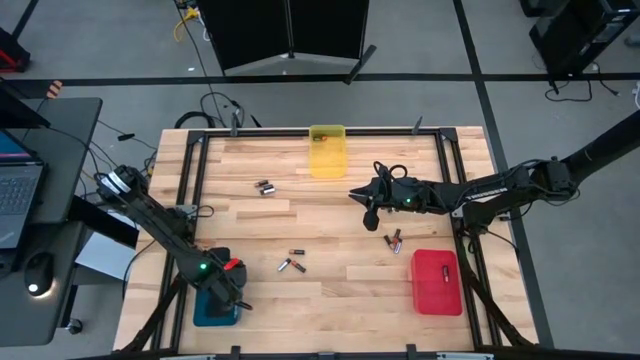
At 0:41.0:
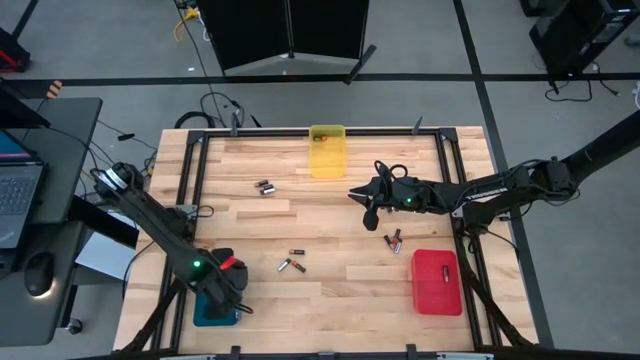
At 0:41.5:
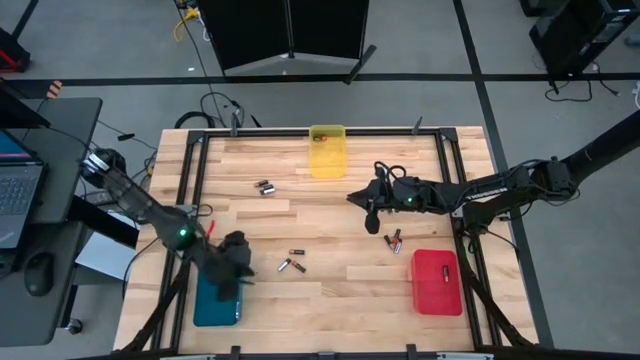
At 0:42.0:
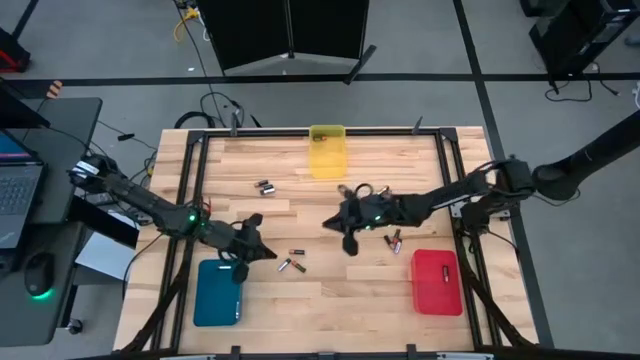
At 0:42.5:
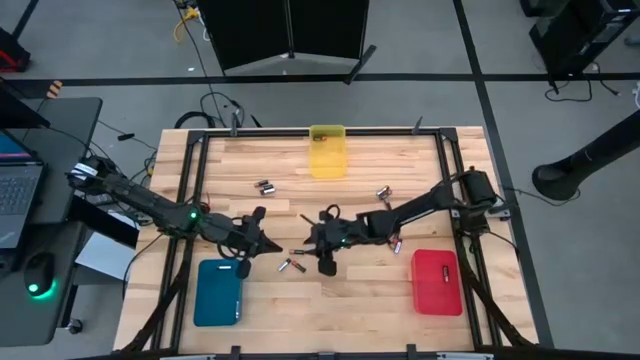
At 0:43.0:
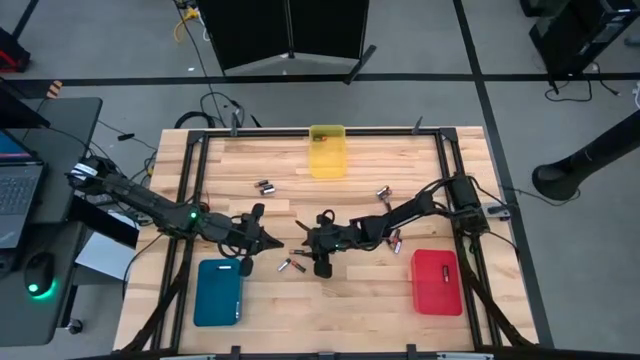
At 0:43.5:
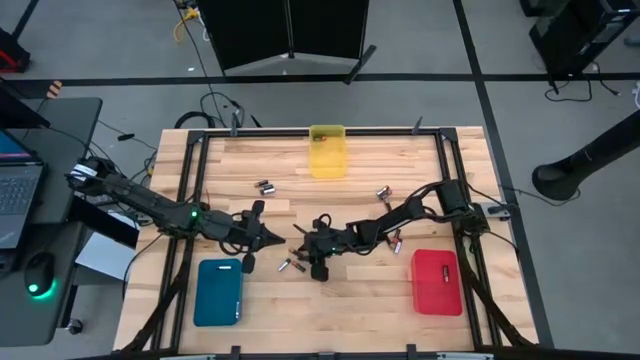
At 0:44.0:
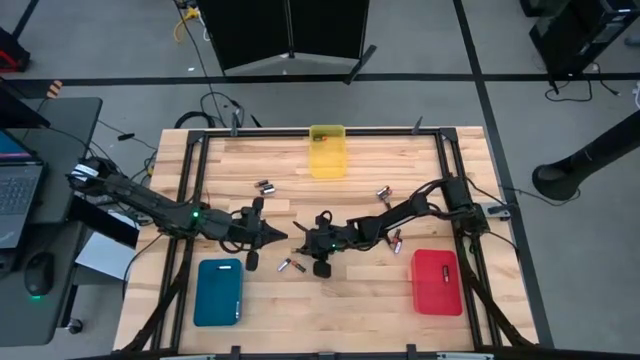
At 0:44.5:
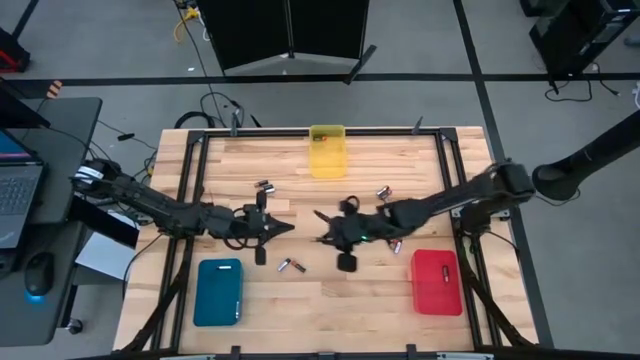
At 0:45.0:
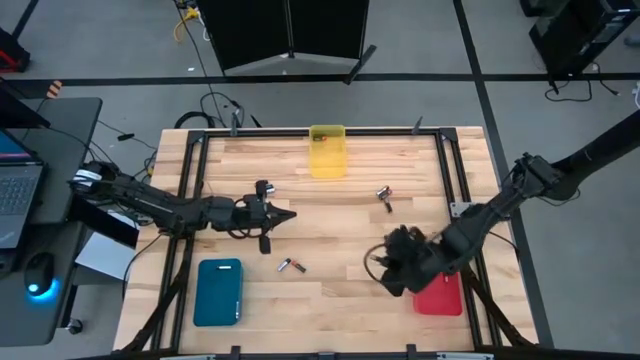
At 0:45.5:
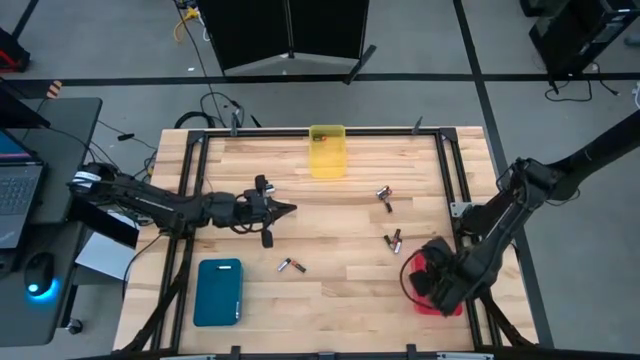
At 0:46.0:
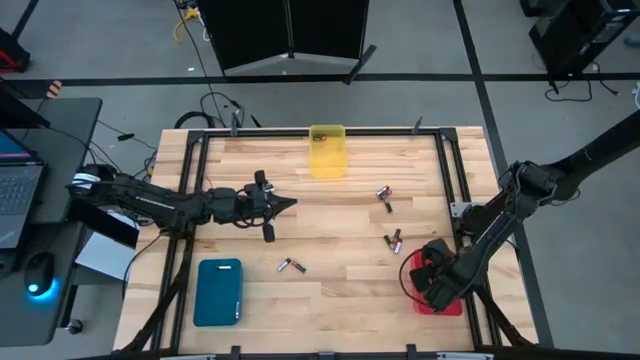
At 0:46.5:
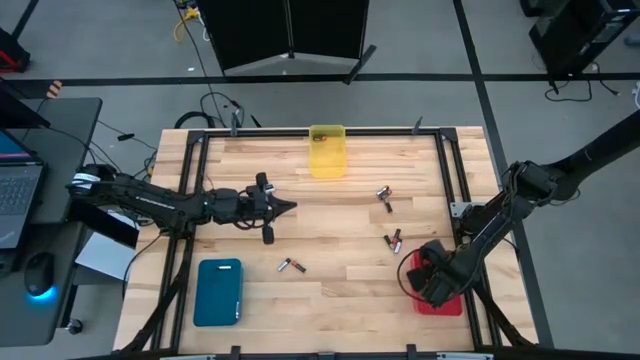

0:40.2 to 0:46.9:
Task: Sort batteries
Put the golden battery into the red bin

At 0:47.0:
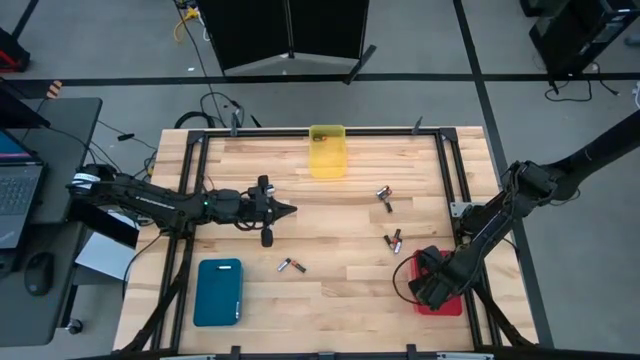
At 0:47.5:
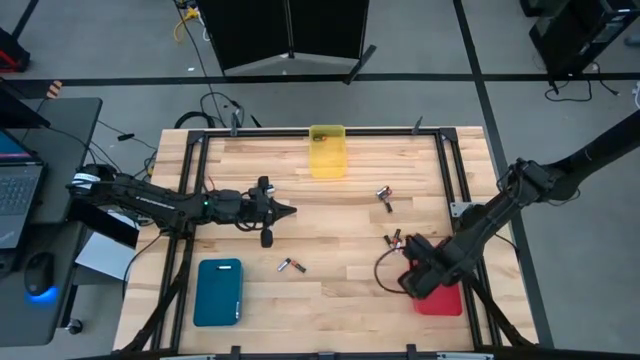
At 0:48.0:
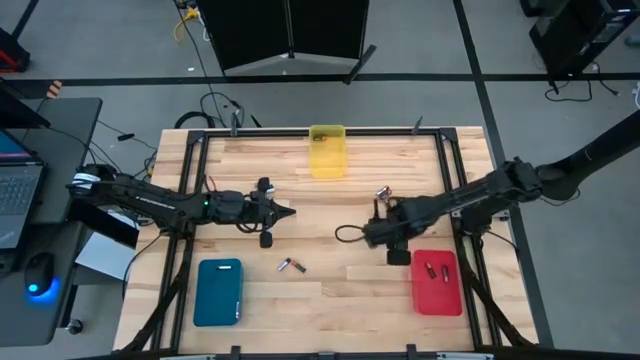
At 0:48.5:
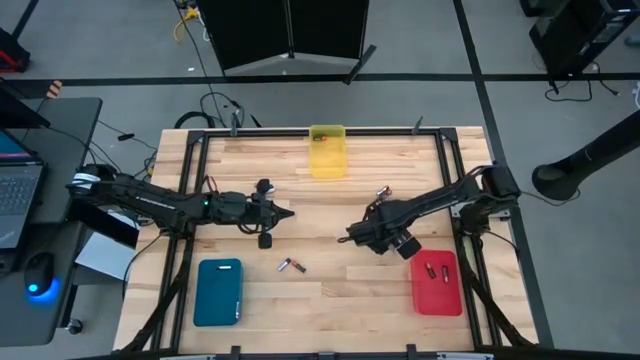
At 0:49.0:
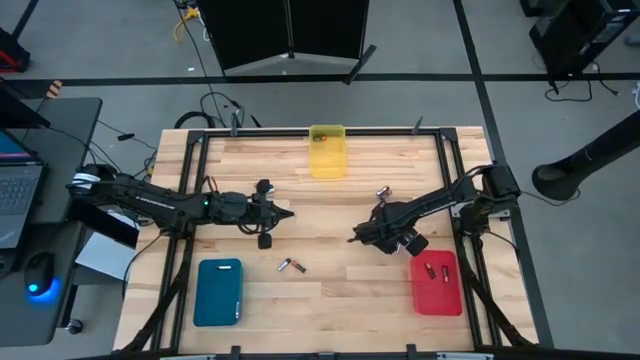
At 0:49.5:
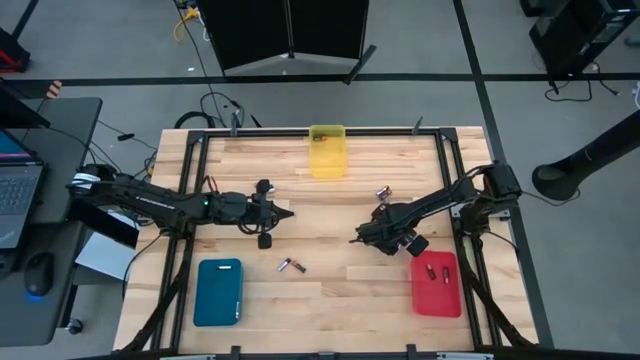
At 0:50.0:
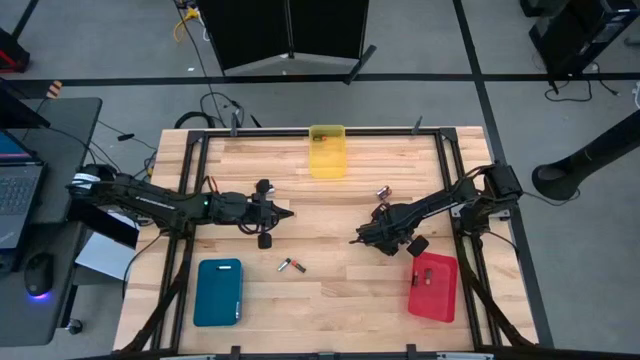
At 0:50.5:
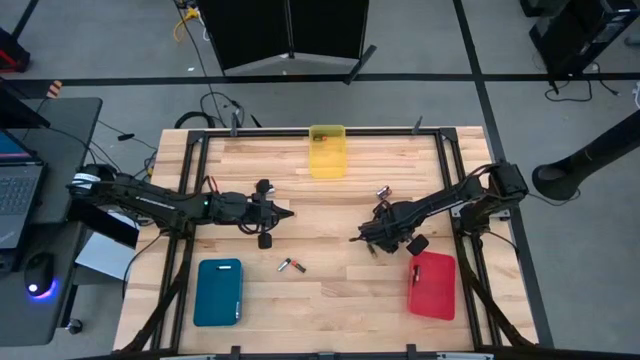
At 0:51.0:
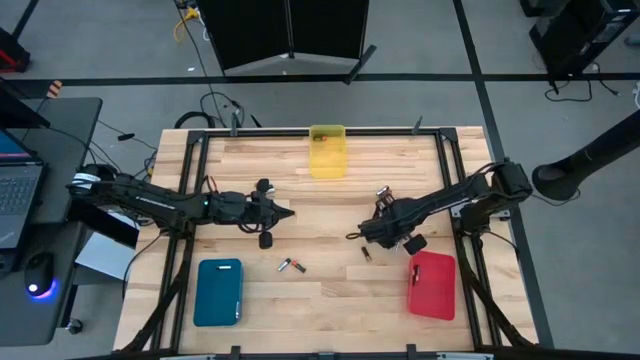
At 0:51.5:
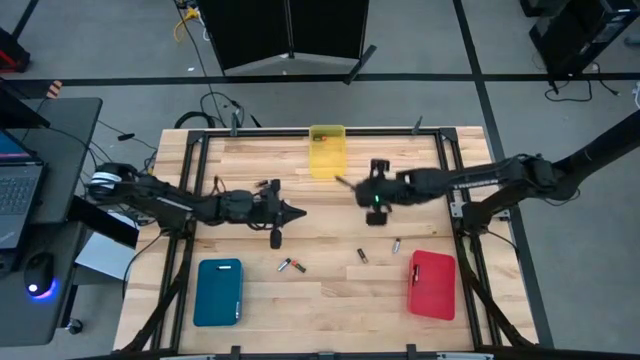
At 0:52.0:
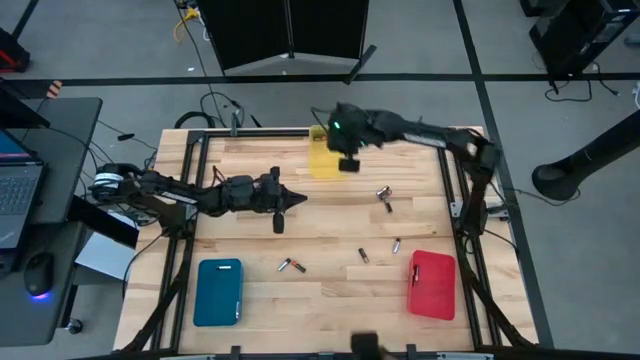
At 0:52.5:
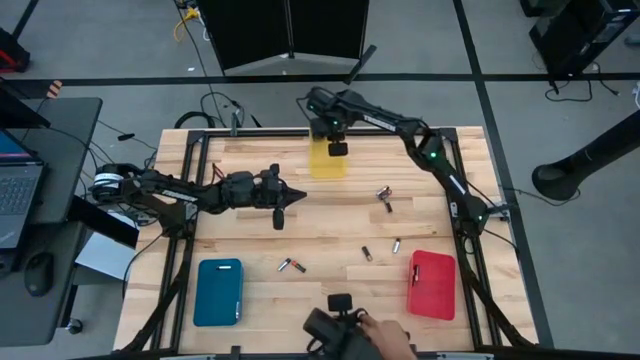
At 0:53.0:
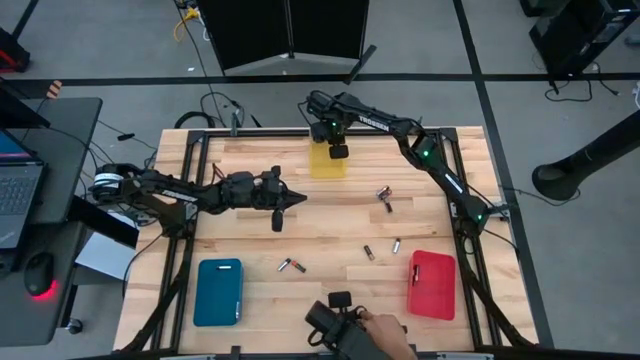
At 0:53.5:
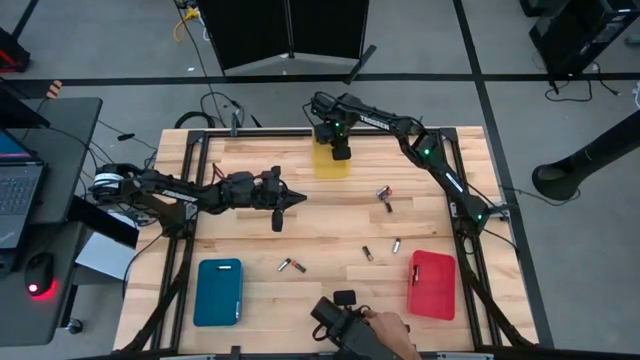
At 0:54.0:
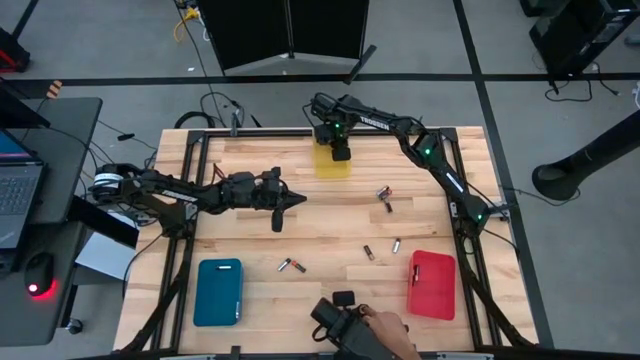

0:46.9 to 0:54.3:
Put the bottom right orange battery into the yellow bin

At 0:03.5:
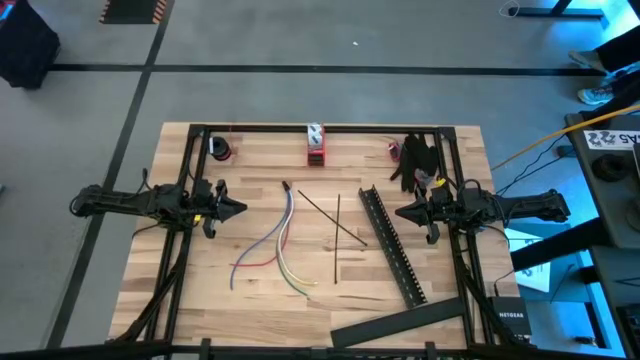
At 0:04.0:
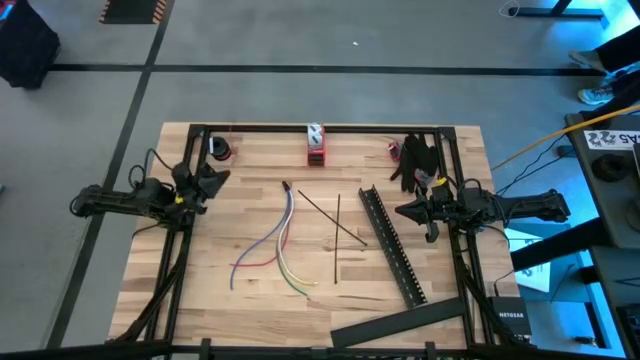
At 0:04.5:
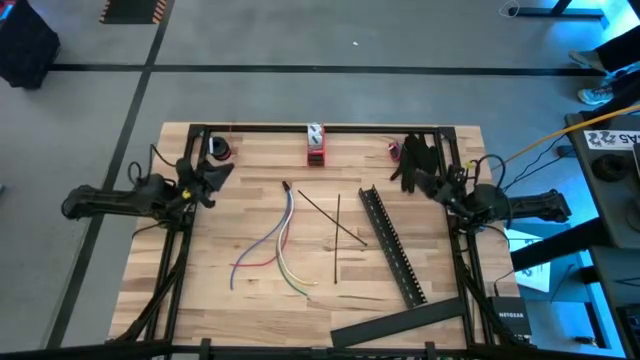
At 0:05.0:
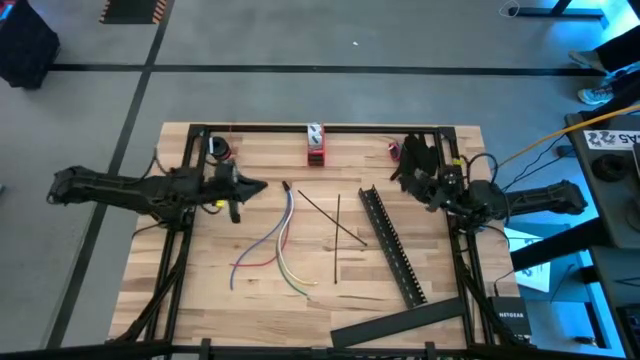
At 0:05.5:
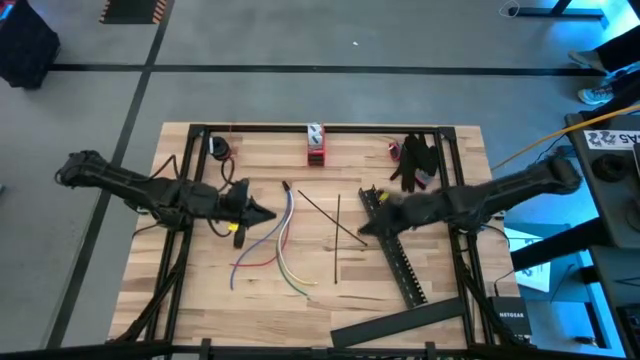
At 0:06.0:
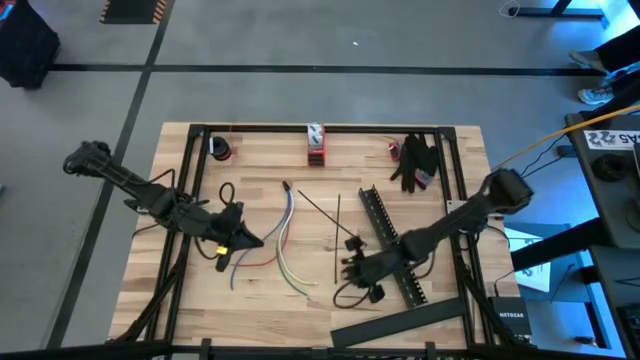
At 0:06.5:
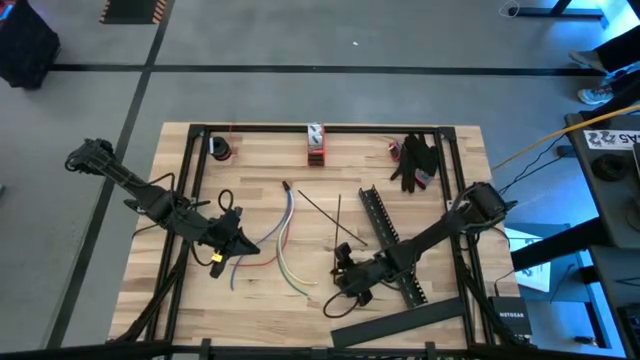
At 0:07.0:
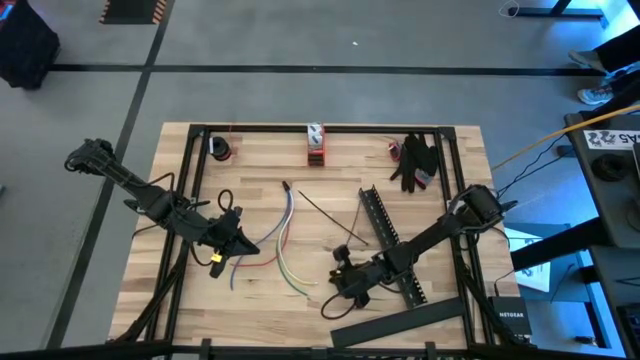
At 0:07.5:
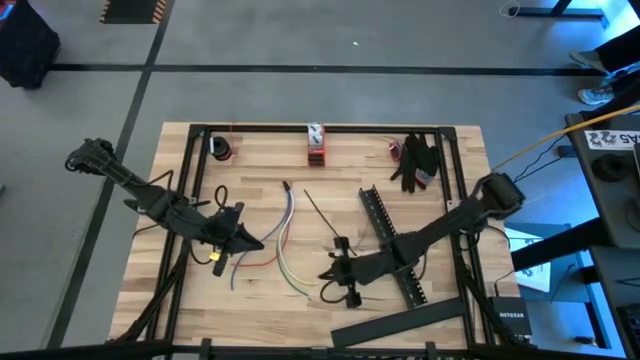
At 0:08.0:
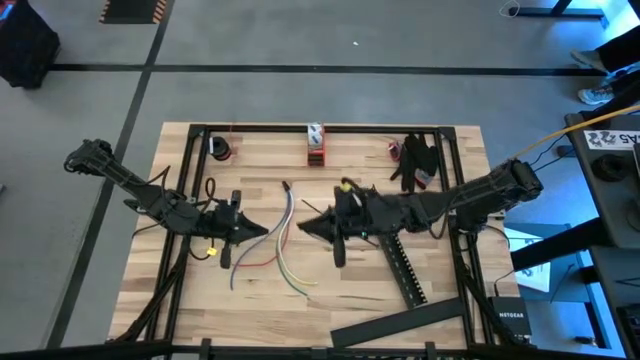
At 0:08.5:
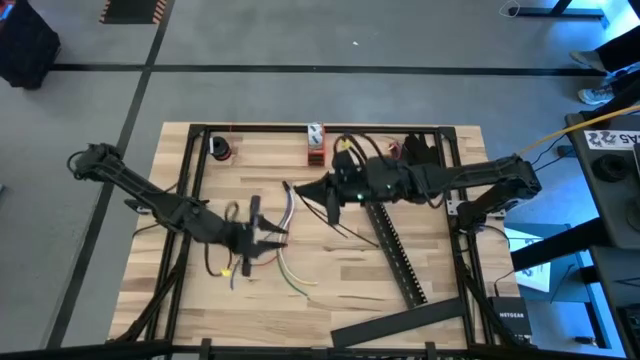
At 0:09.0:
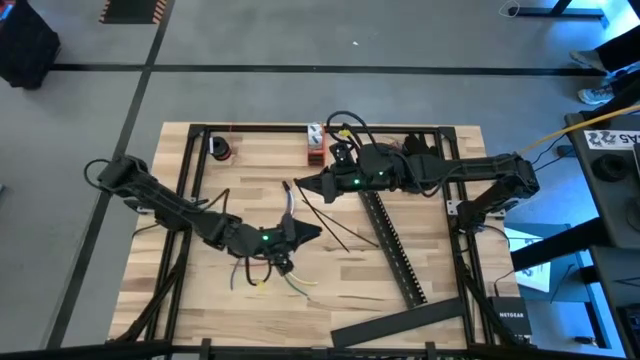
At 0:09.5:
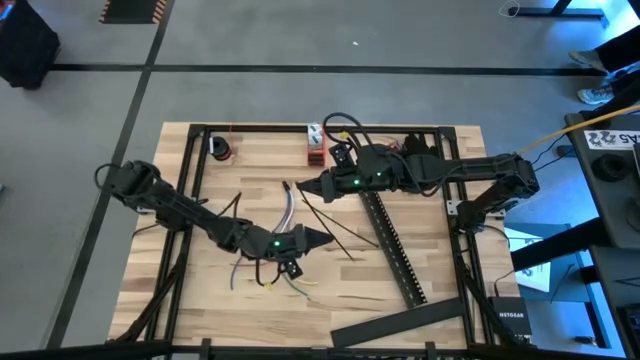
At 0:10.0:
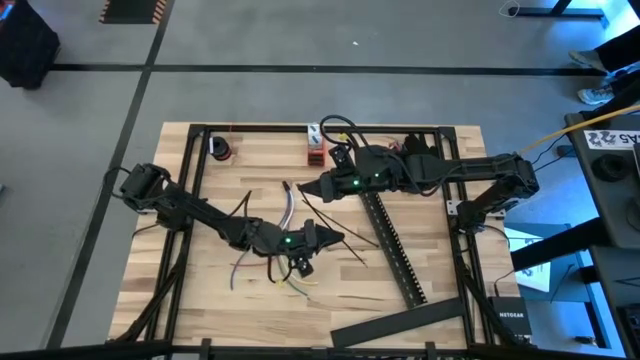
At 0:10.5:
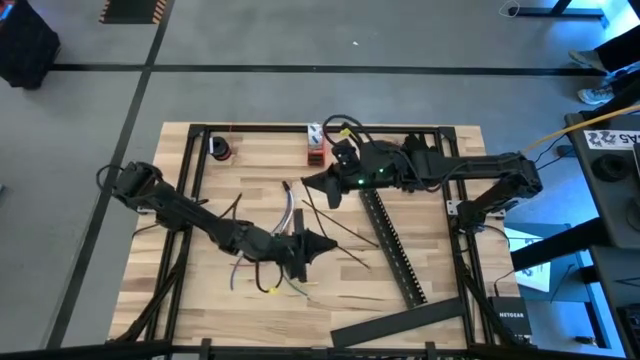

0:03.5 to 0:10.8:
Task: Ziptie cables
Wrap the black zip tie on the cable

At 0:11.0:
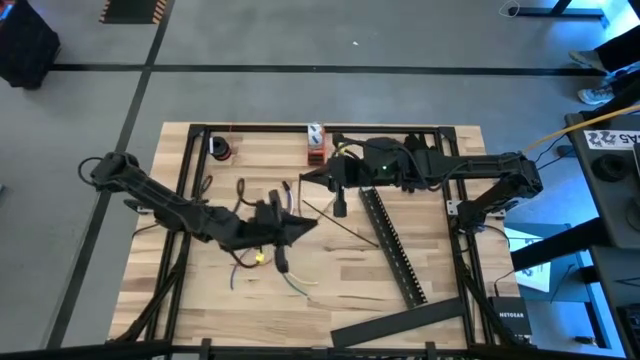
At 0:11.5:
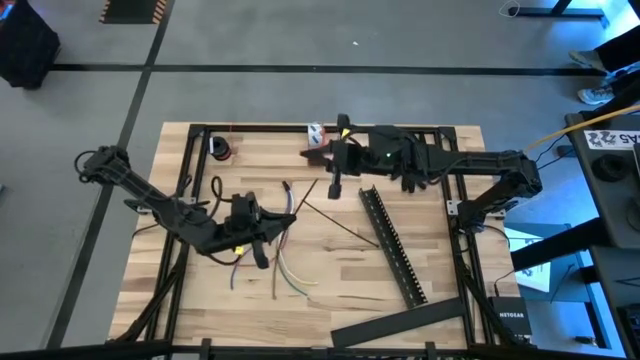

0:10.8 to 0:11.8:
Wrap the black zip tie on the cable
